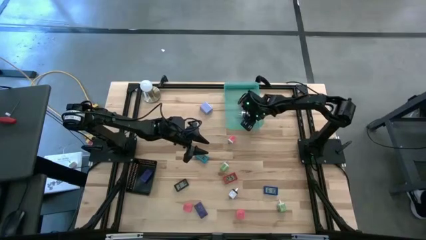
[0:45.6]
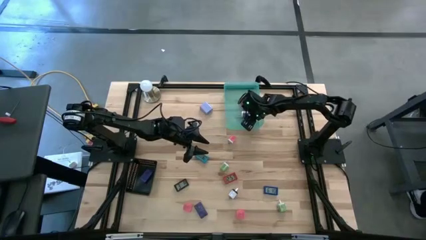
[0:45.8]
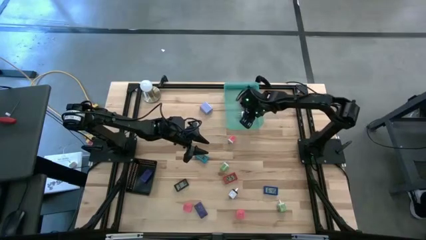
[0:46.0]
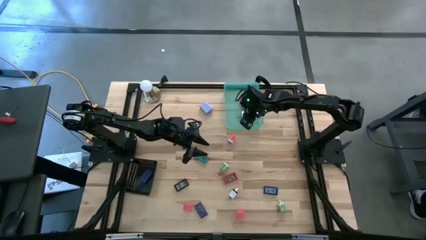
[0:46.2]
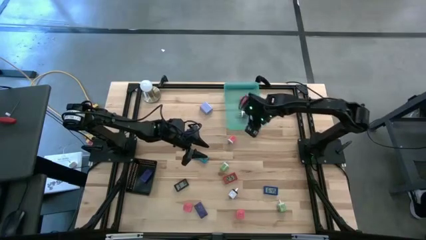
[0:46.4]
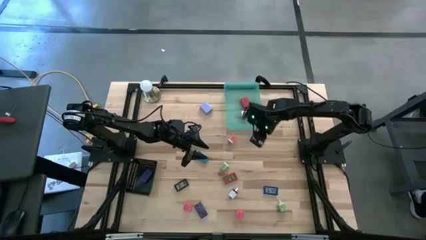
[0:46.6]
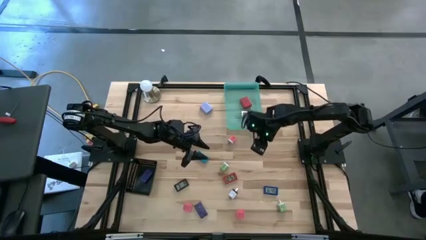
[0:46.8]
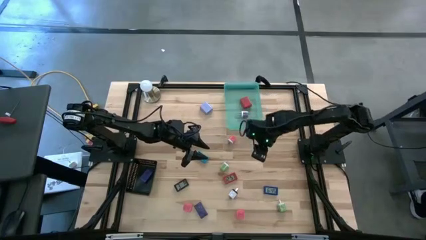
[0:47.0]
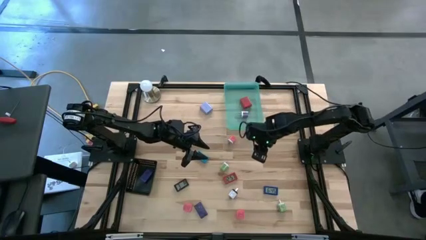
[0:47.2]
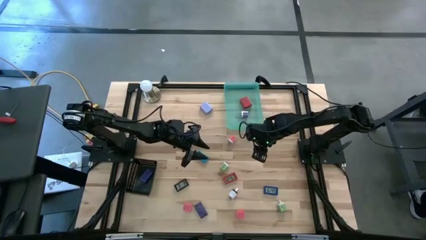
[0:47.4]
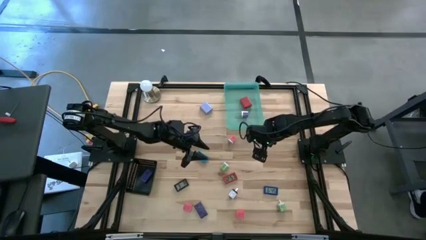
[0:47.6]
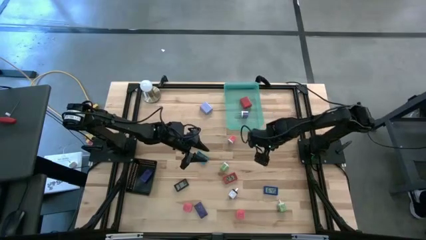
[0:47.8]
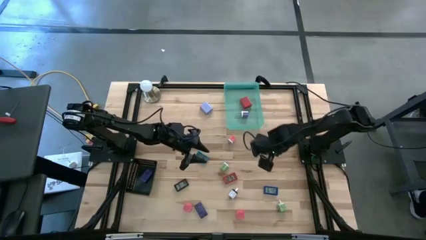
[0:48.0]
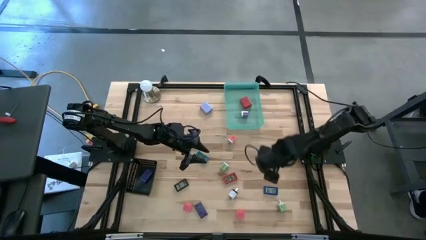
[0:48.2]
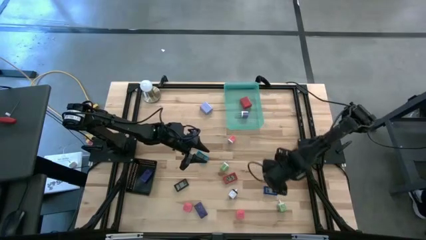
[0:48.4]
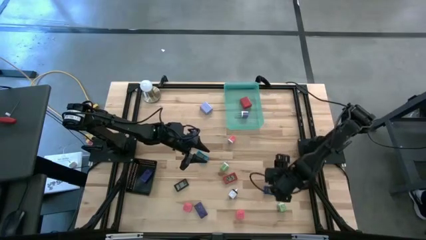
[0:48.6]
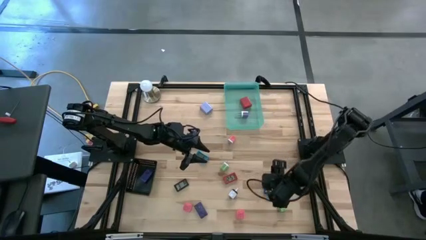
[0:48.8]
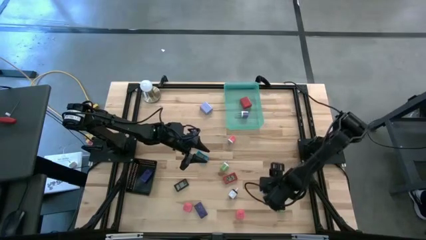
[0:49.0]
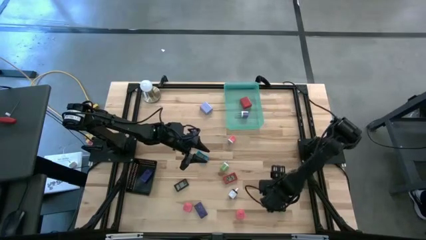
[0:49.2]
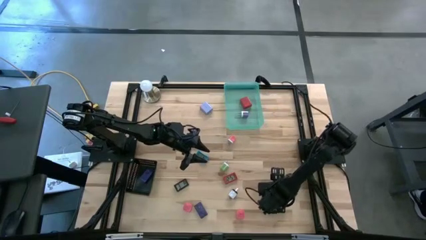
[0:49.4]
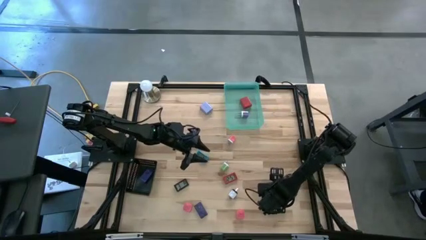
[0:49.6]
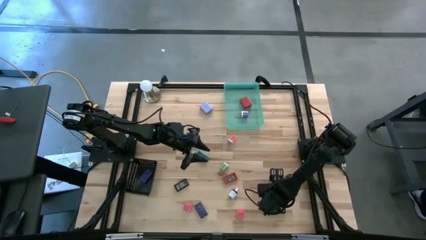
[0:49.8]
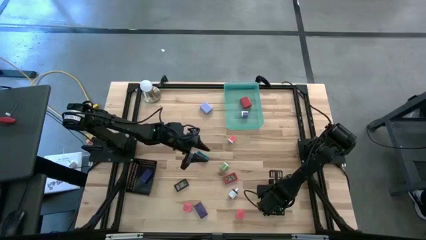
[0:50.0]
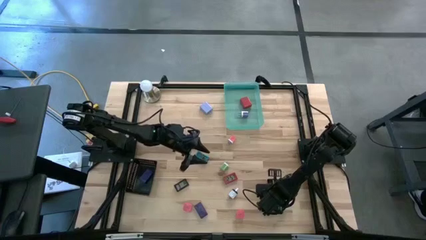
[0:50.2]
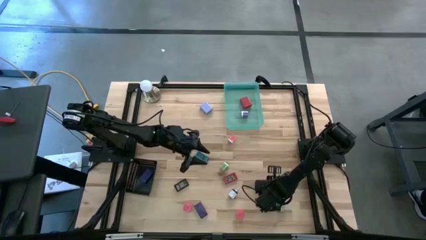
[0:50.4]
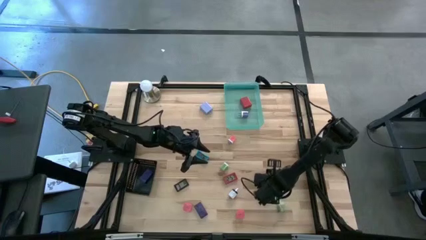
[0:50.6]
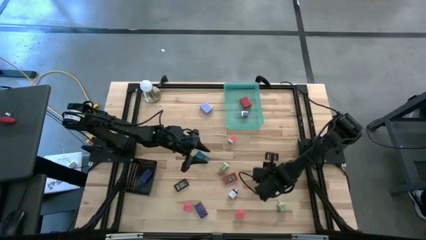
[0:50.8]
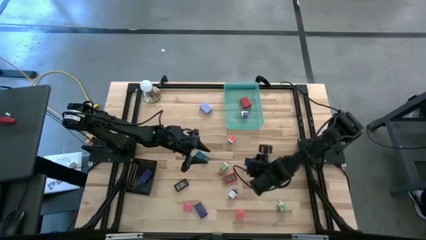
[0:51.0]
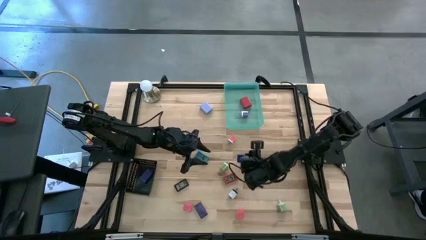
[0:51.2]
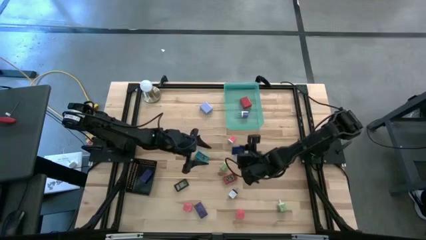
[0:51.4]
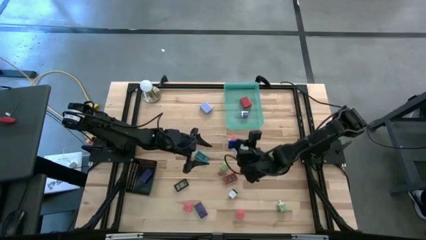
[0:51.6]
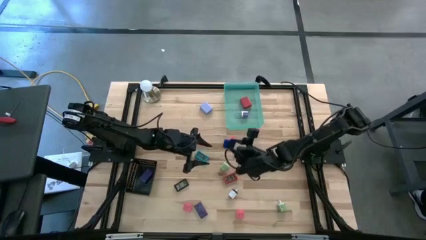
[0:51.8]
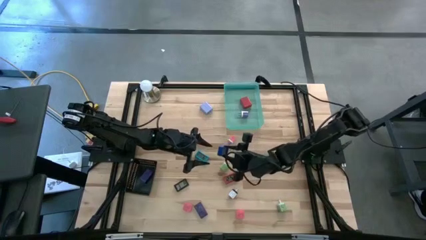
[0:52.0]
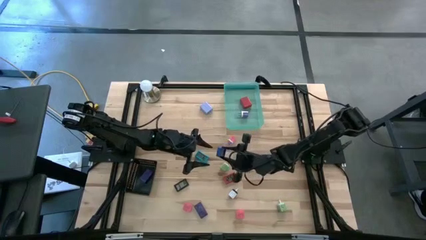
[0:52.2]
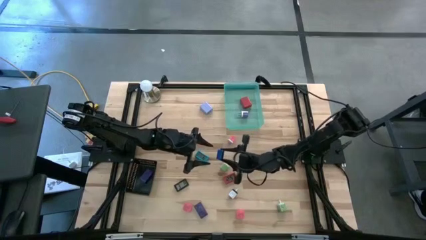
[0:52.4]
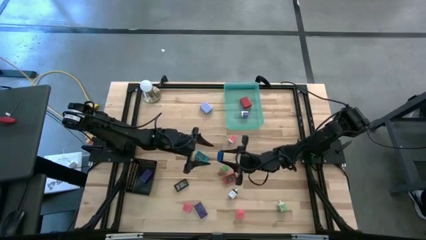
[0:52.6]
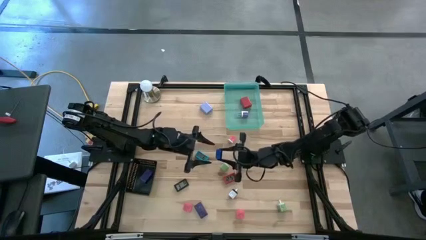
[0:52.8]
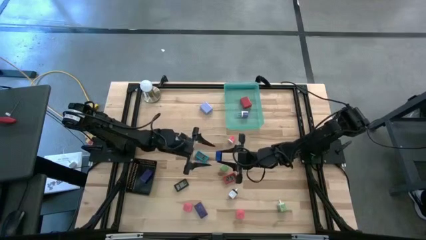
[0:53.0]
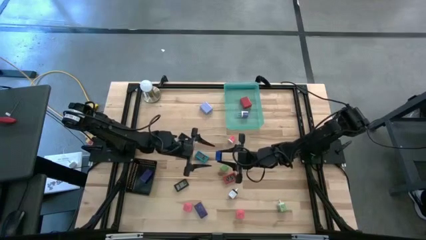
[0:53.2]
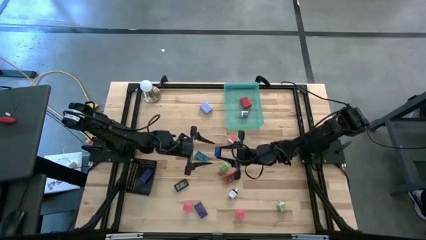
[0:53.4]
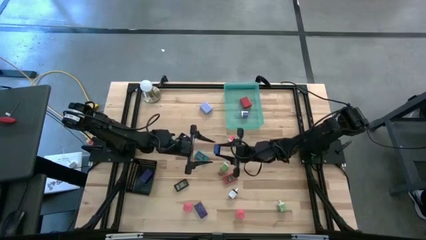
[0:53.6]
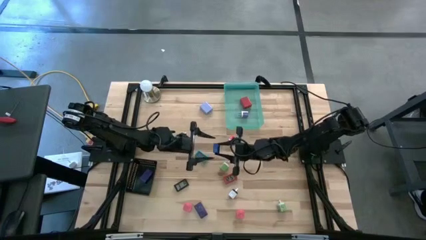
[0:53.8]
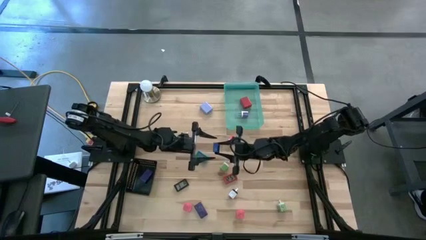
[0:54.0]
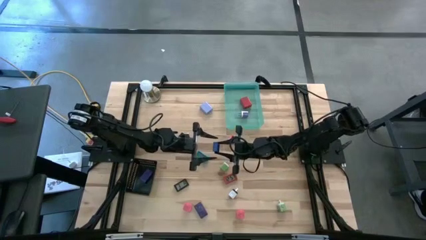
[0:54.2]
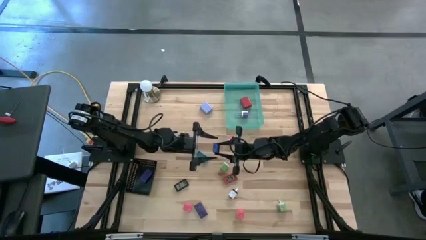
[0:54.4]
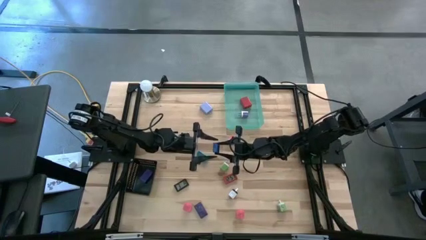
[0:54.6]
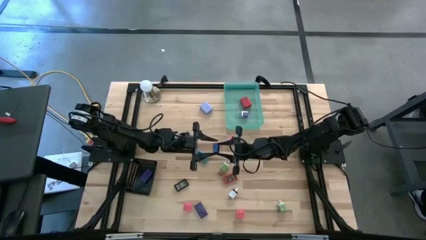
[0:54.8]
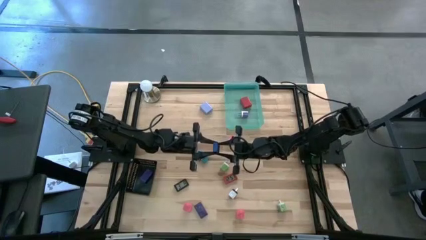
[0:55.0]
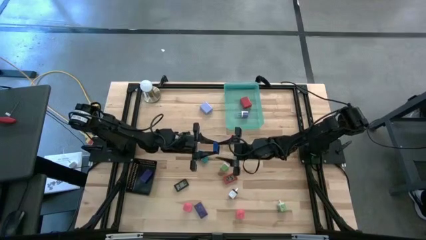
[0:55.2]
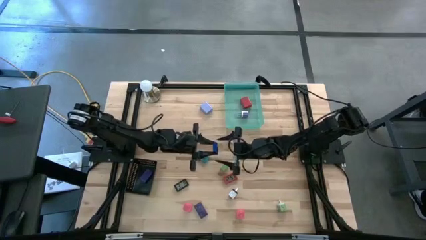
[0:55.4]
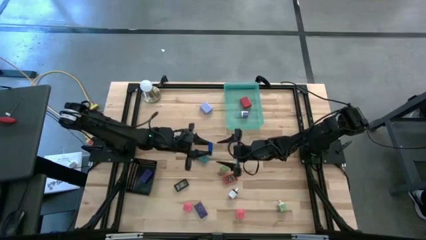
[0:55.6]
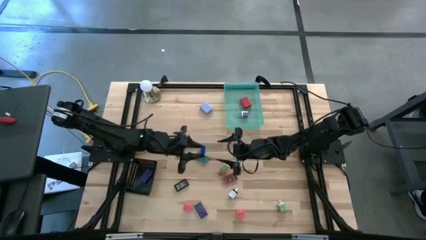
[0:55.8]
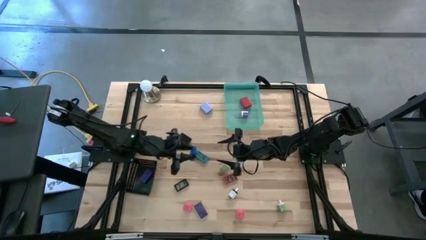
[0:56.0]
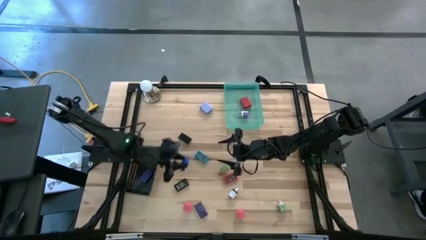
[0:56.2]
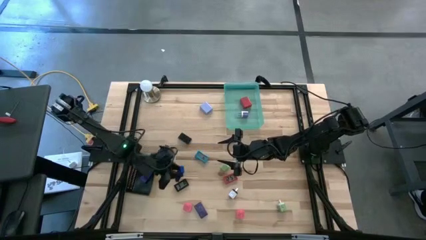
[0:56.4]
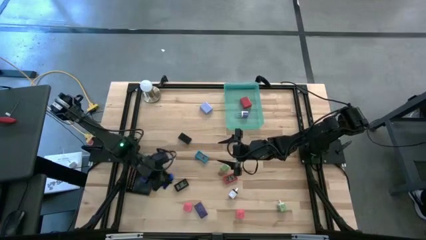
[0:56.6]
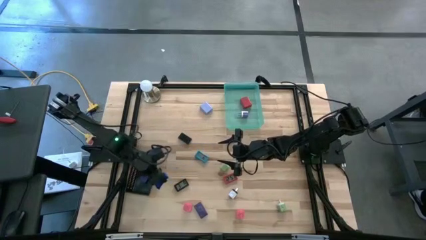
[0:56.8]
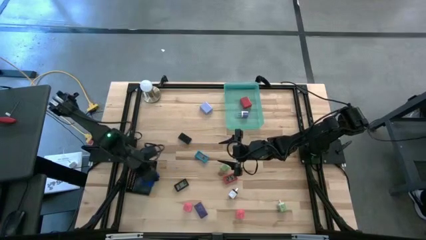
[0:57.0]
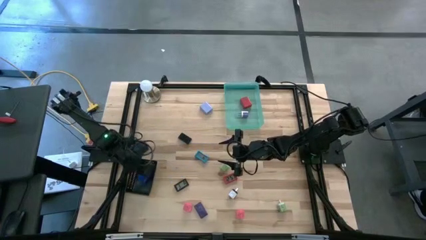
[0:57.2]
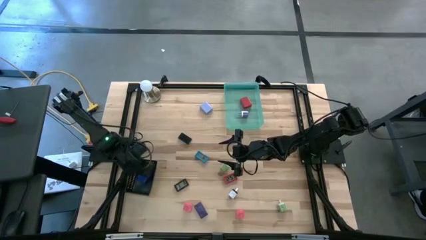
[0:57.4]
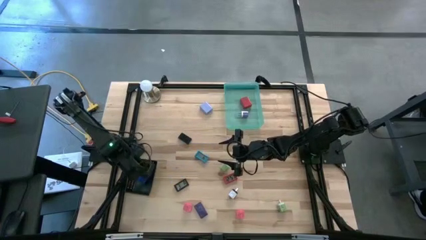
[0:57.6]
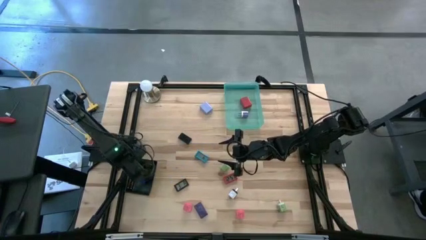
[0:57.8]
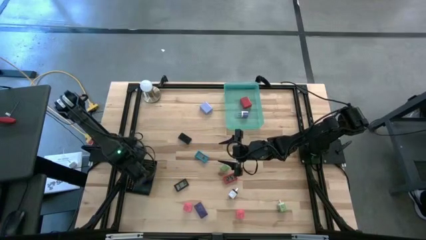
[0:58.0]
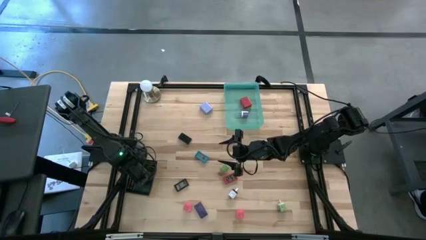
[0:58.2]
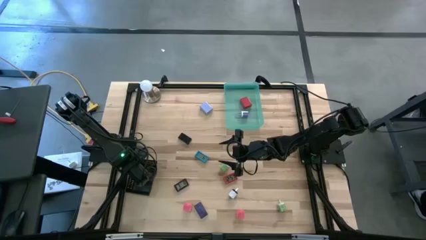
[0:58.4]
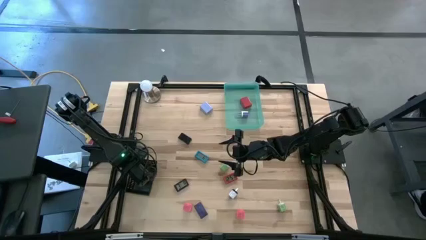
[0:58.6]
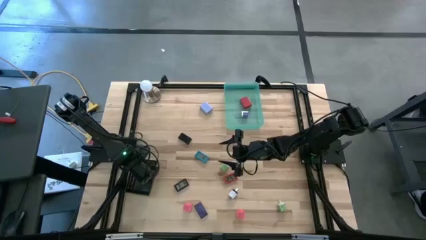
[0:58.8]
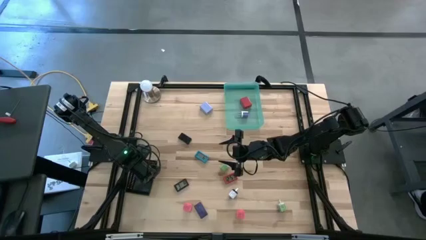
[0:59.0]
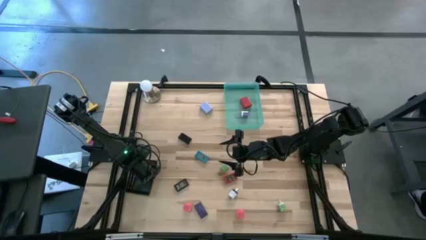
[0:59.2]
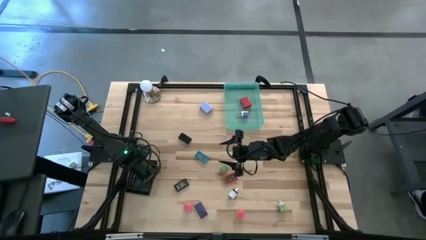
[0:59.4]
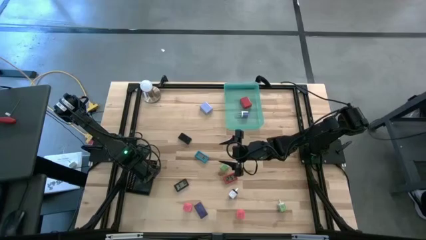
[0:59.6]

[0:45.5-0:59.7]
Task: Pick & Place Office items
Put the top blue digital timer into the black bin
